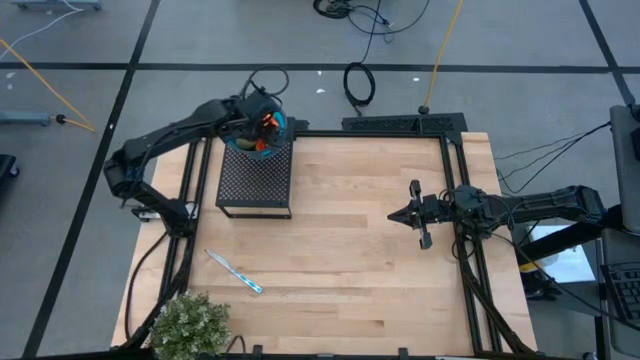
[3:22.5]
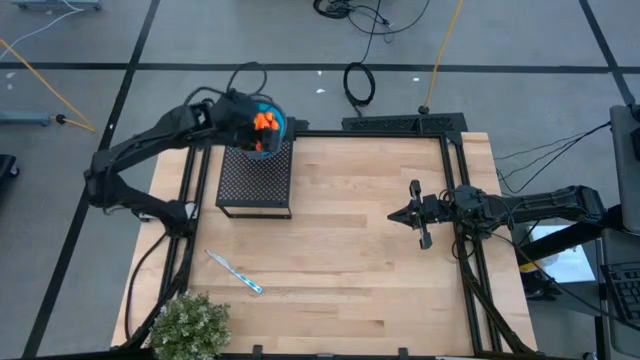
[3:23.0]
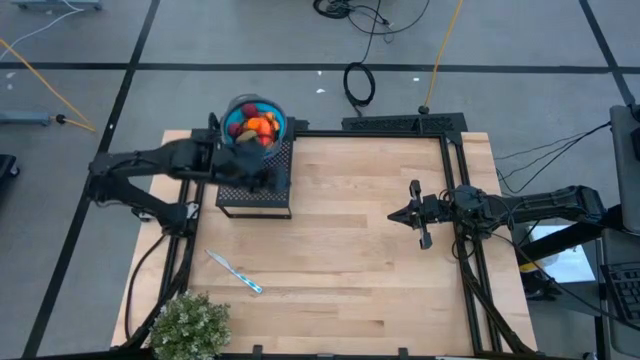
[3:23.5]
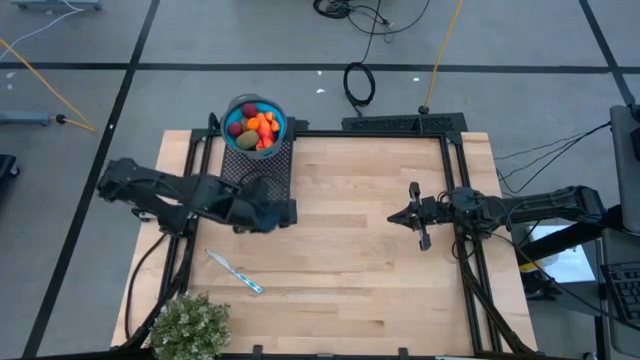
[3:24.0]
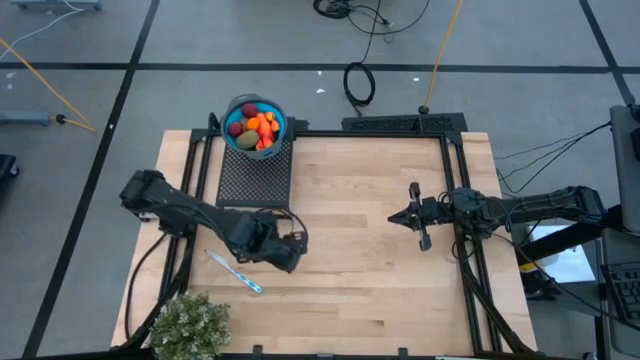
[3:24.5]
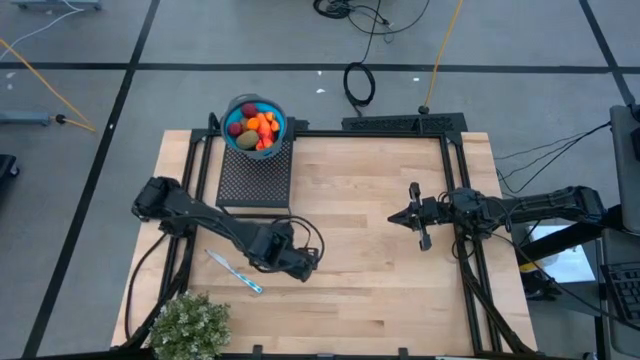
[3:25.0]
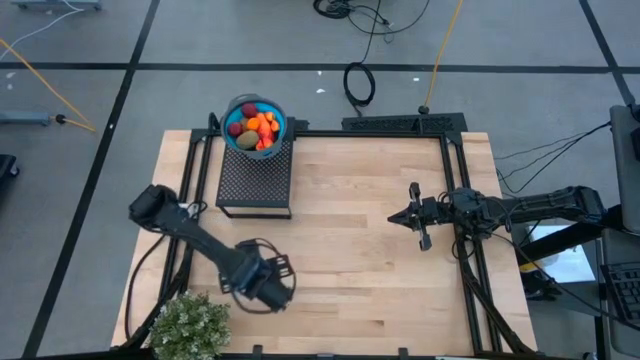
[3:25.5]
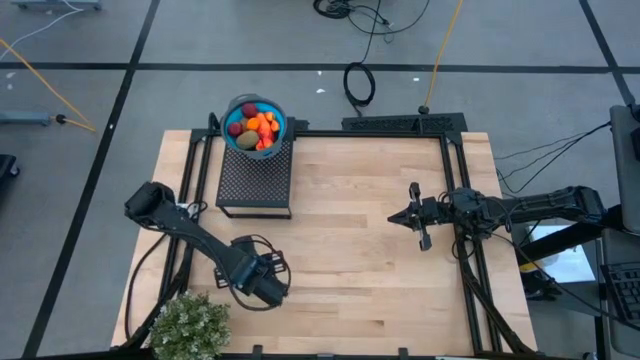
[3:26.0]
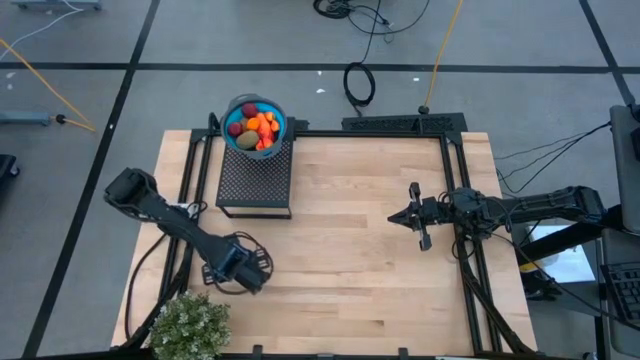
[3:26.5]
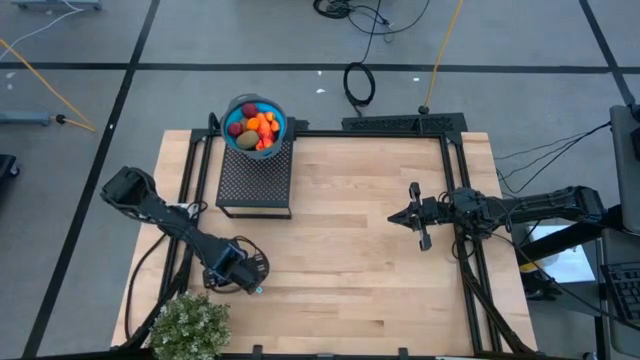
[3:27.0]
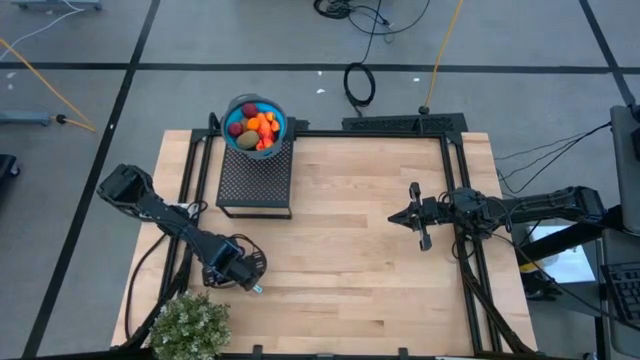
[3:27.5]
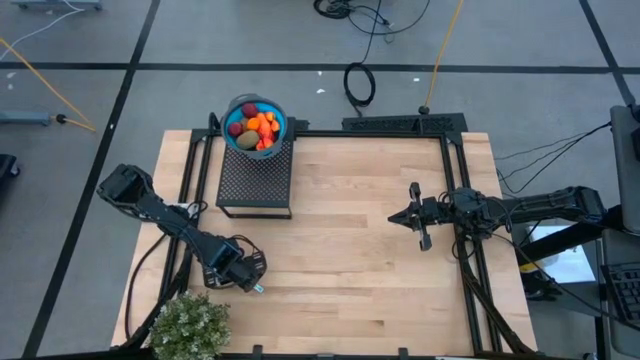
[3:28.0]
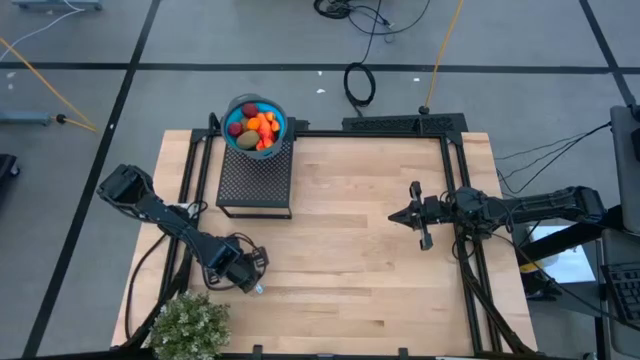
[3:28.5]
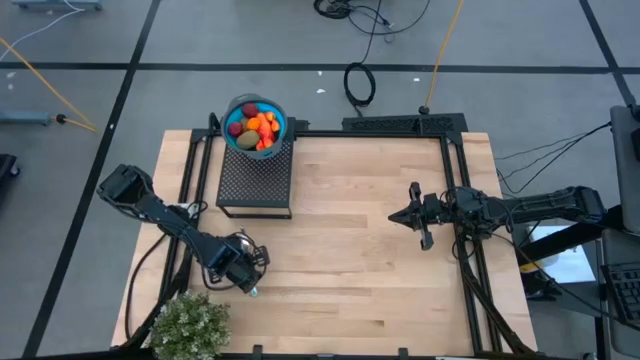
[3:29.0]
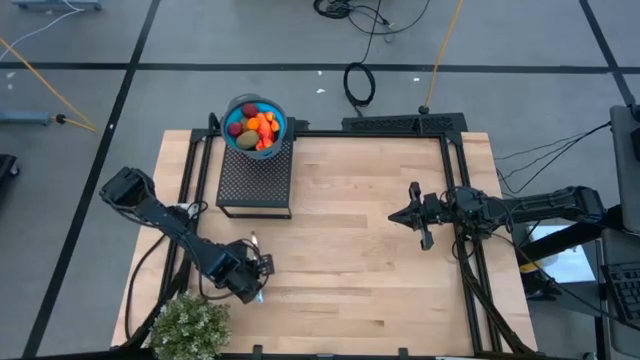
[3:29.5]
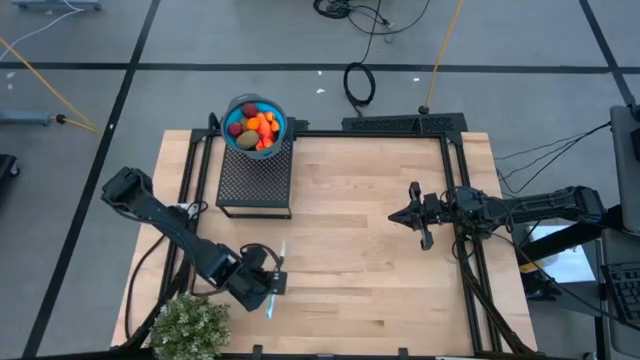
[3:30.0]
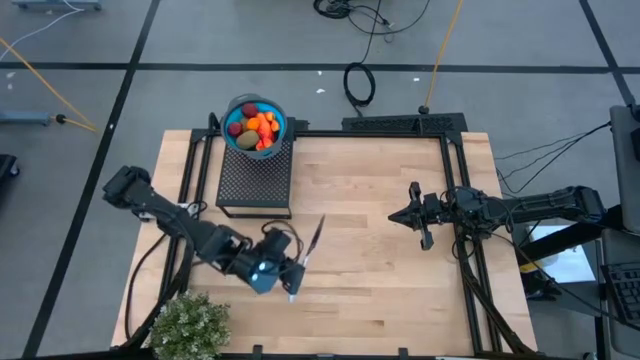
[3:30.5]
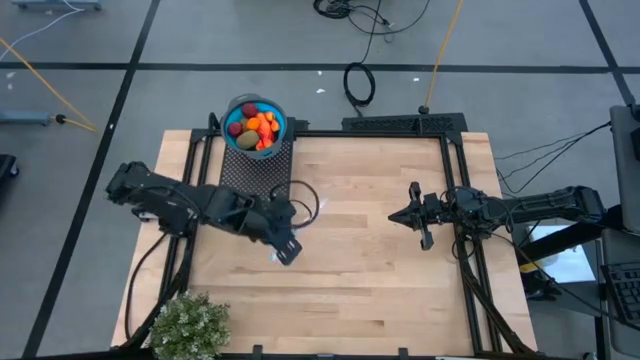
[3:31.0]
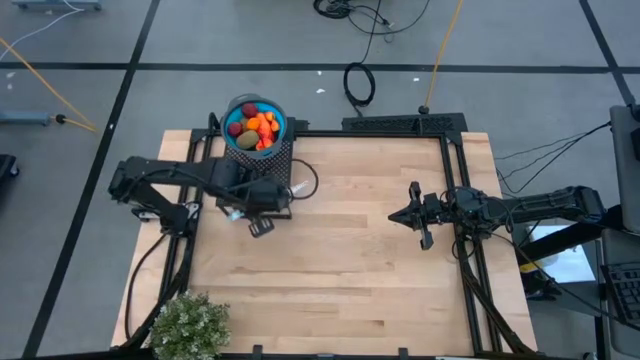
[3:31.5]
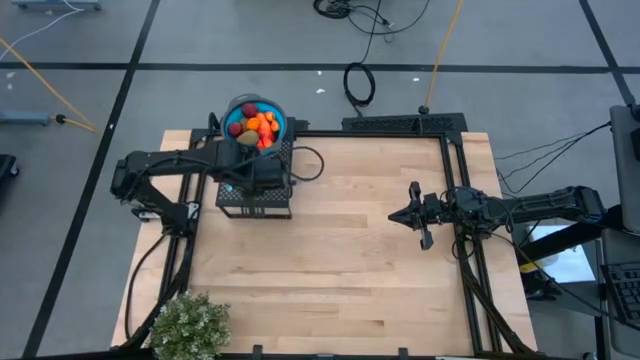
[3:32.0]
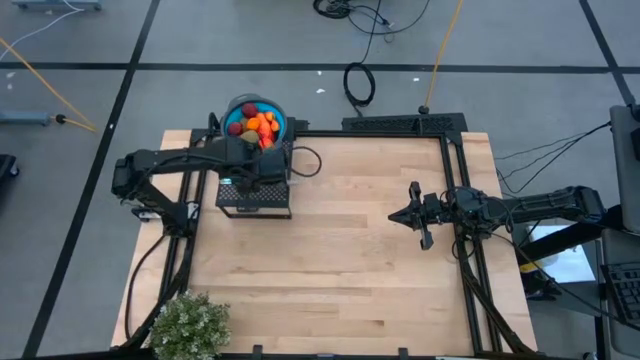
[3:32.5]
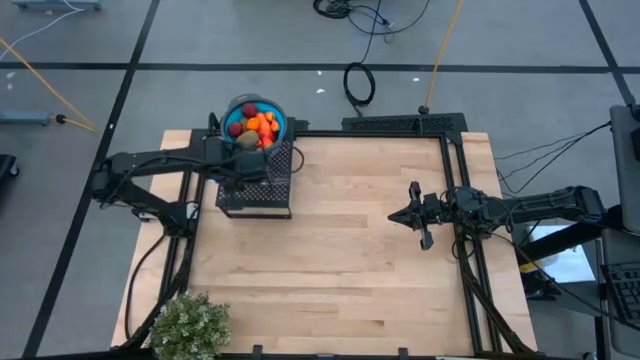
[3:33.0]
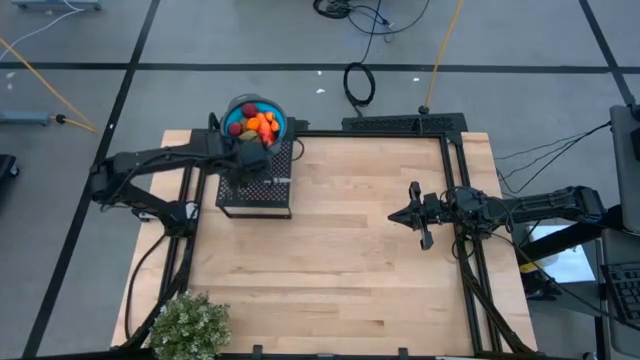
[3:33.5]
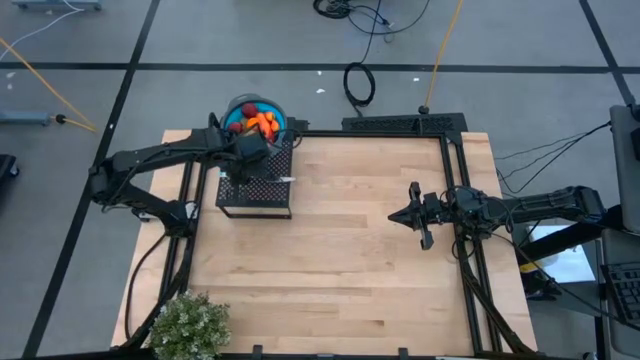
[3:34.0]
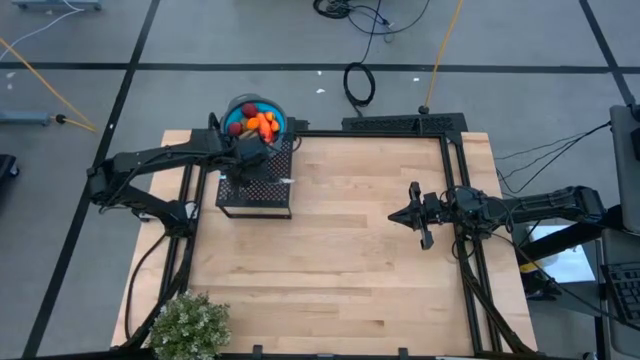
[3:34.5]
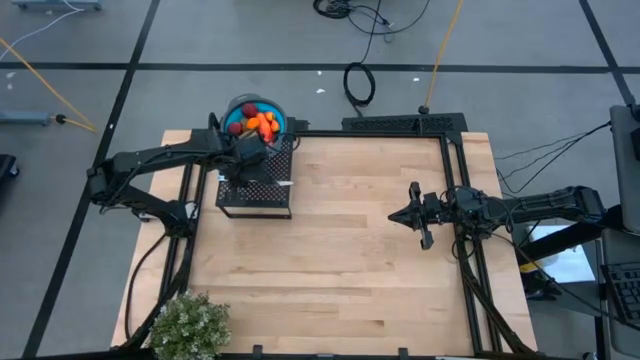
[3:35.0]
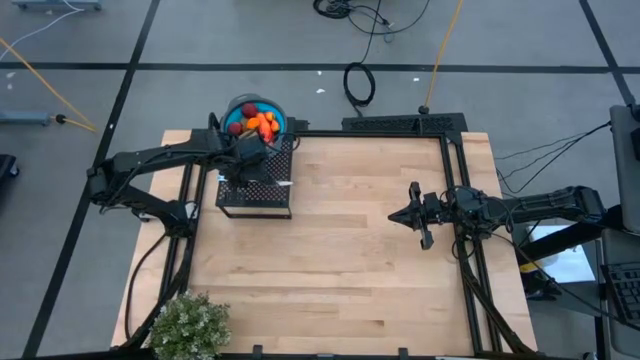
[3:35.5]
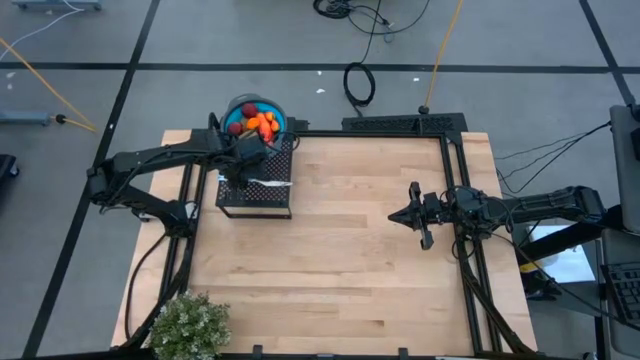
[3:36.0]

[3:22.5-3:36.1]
Task: Pick & Place Fruit
Put the blue patterned table knife on the shelf to the bottom of the blue strainer bowl

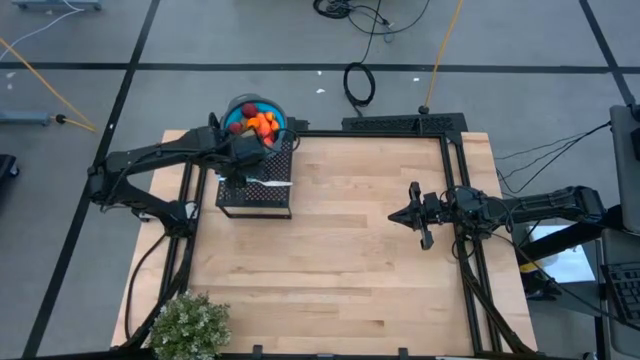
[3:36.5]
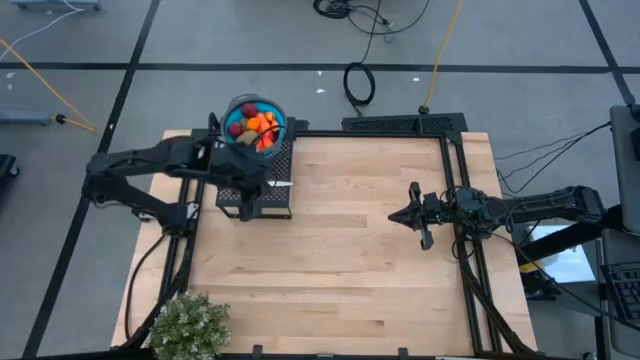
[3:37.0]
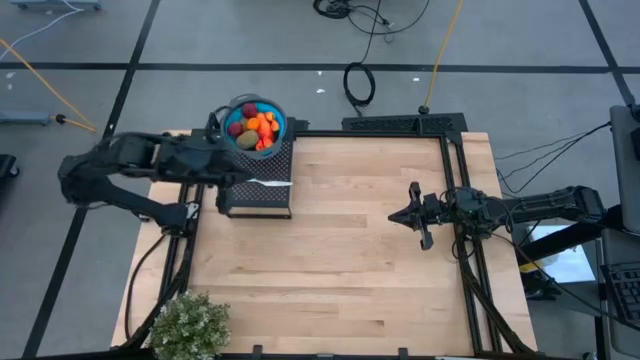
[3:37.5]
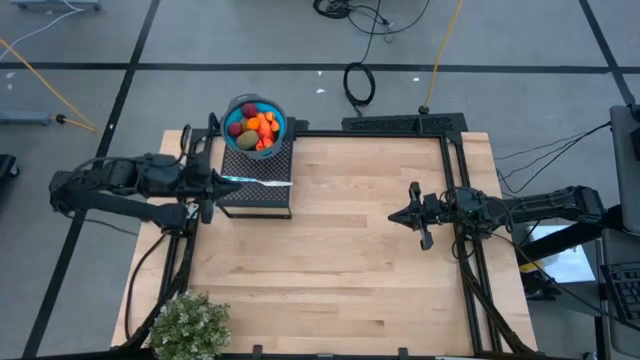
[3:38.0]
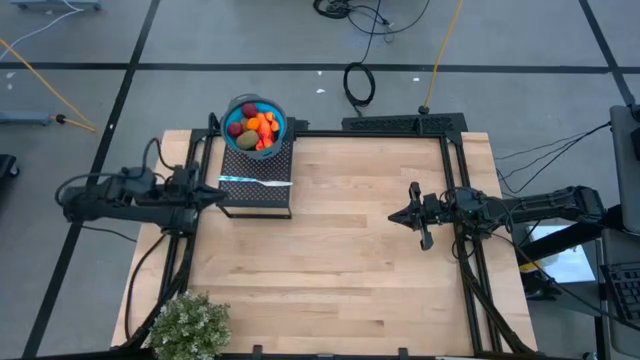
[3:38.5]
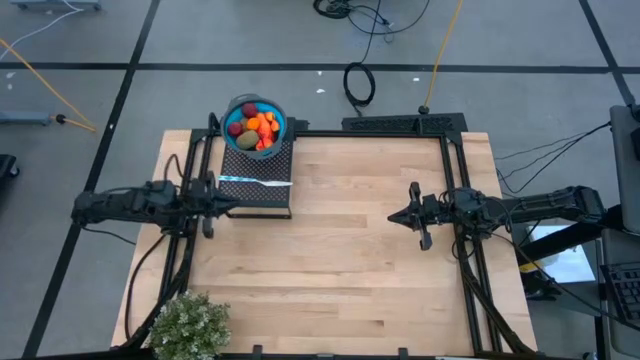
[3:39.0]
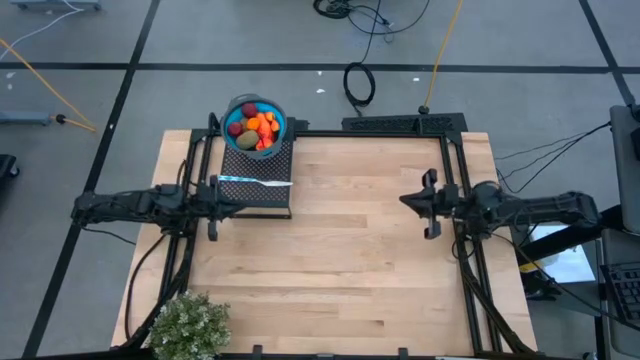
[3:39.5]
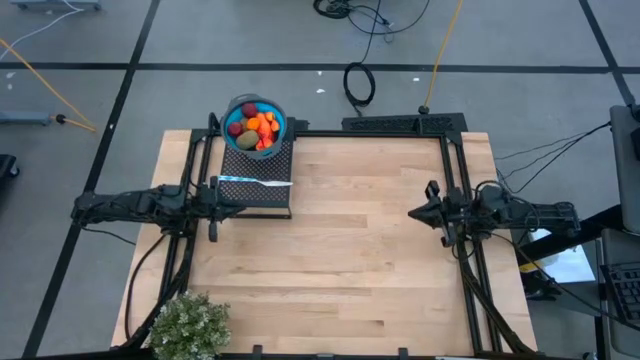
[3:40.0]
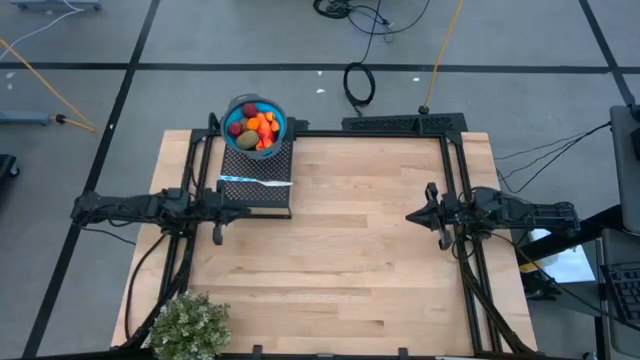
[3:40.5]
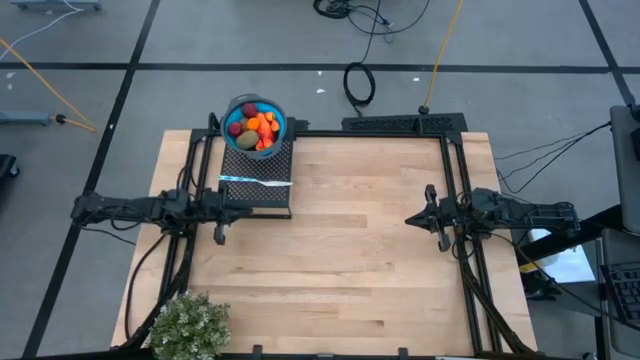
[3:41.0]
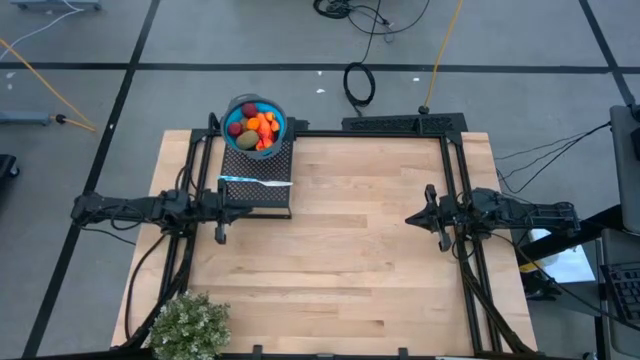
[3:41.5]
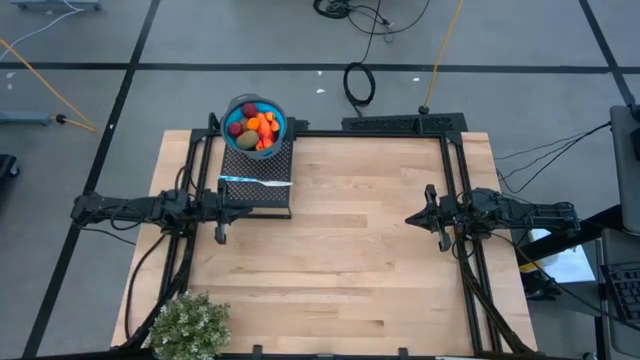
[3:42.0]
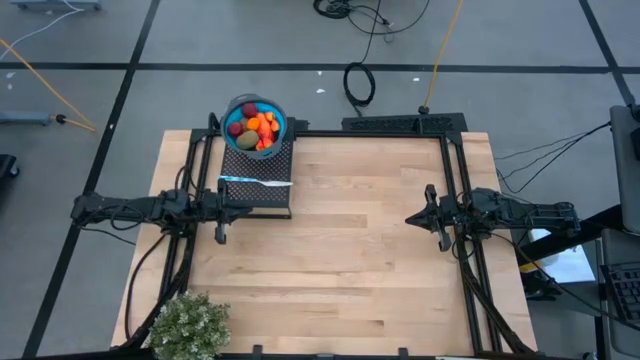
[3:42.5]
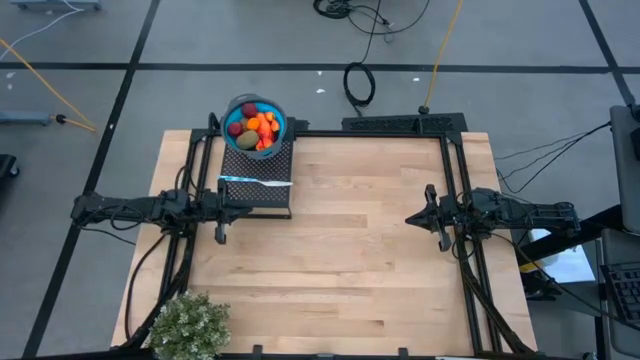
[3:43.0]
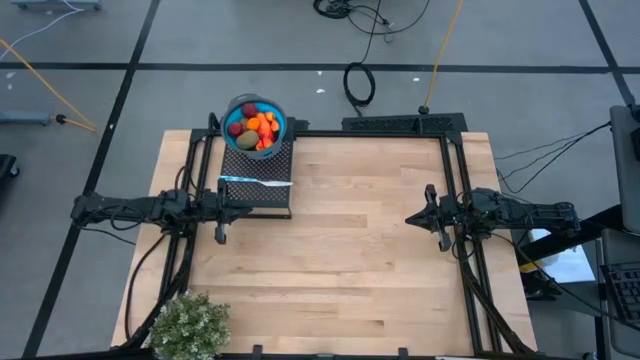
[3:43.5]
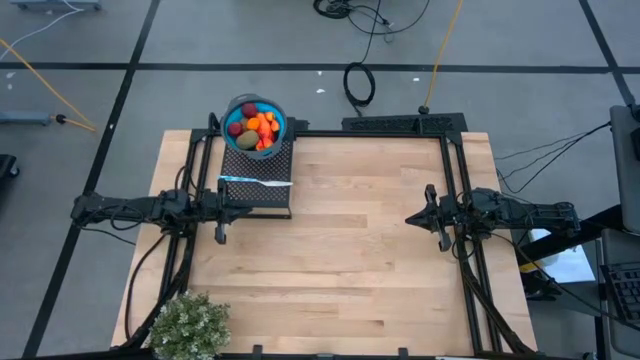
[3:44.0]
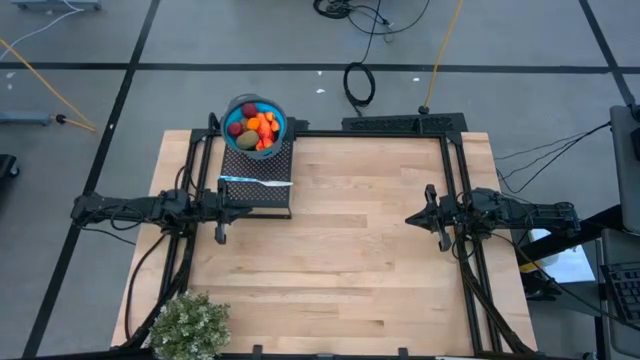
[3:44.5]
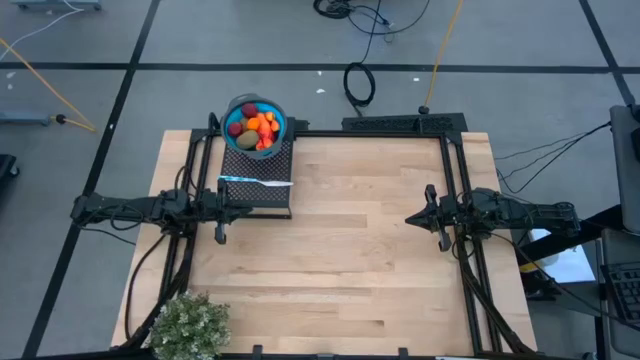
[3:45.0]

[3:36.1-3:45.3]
Return to Home Position
